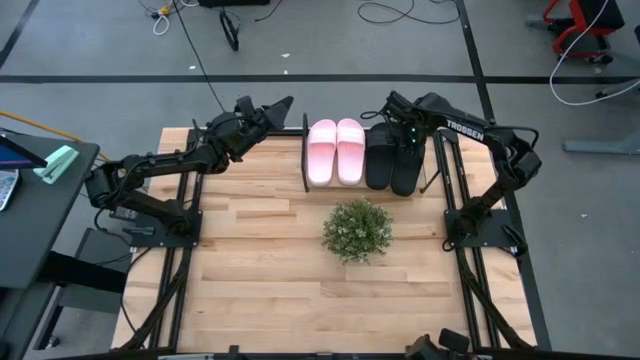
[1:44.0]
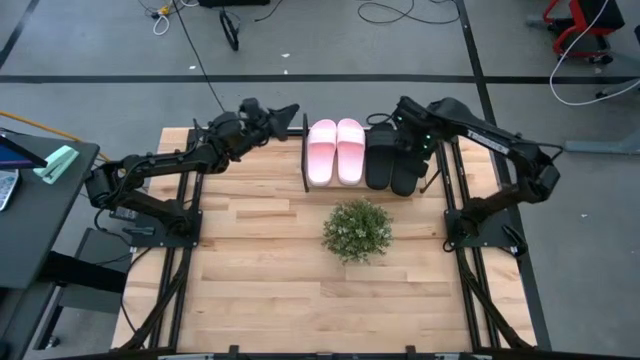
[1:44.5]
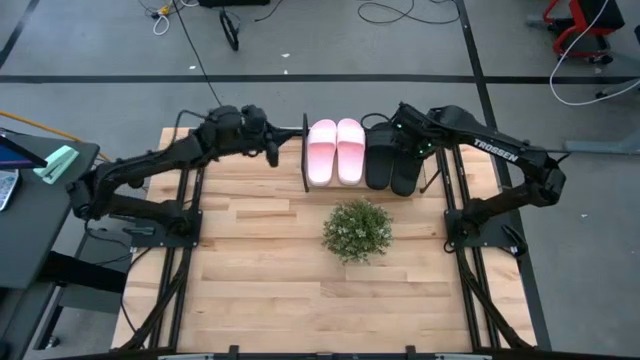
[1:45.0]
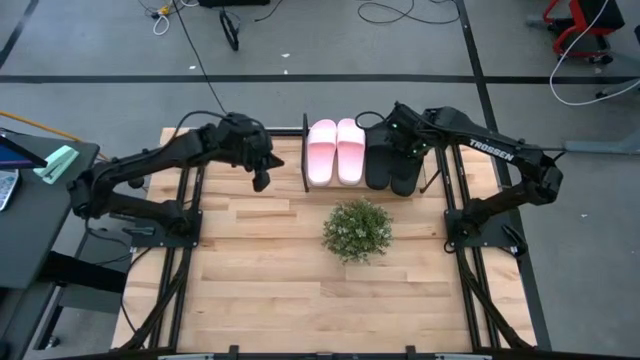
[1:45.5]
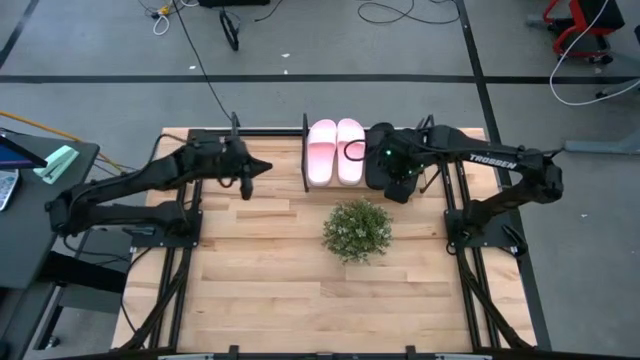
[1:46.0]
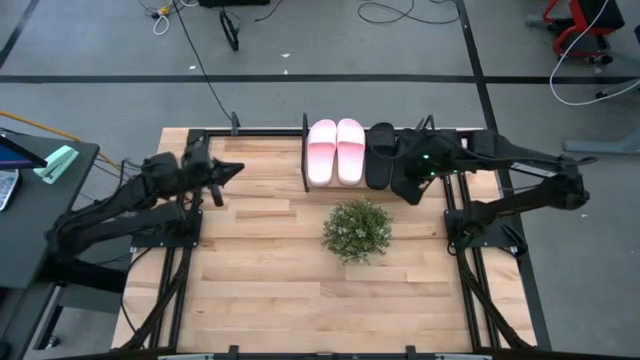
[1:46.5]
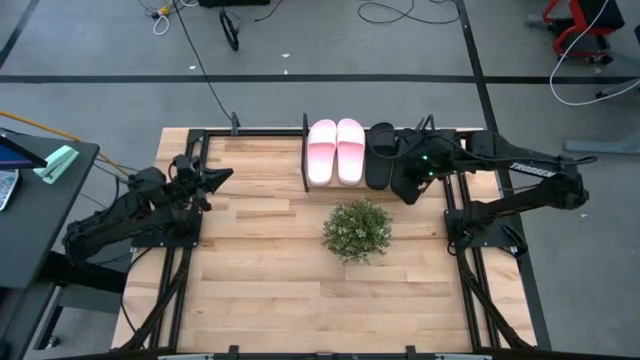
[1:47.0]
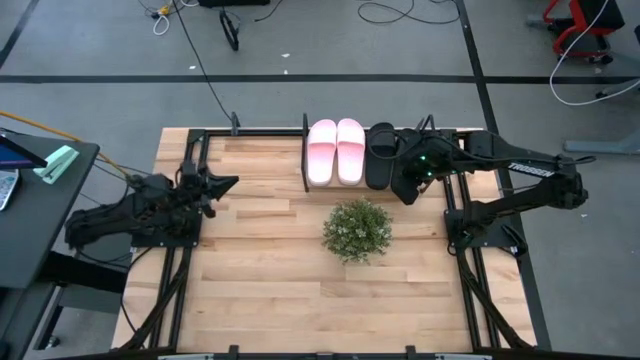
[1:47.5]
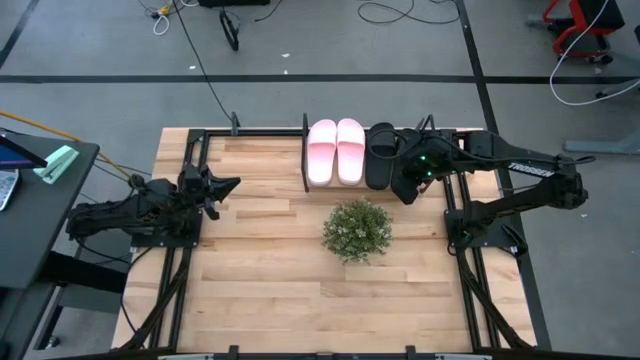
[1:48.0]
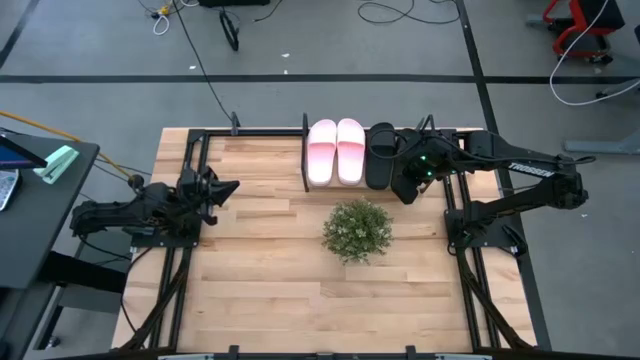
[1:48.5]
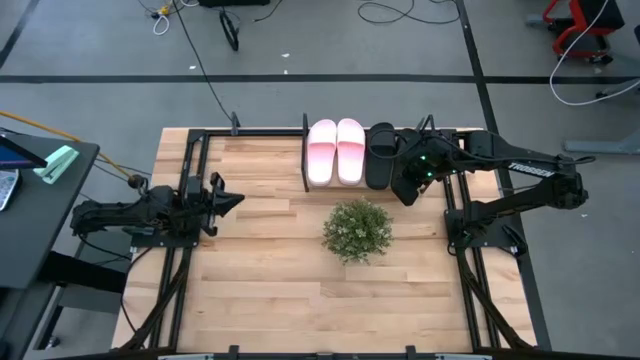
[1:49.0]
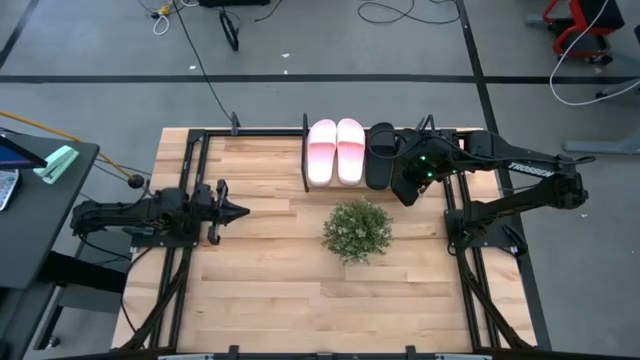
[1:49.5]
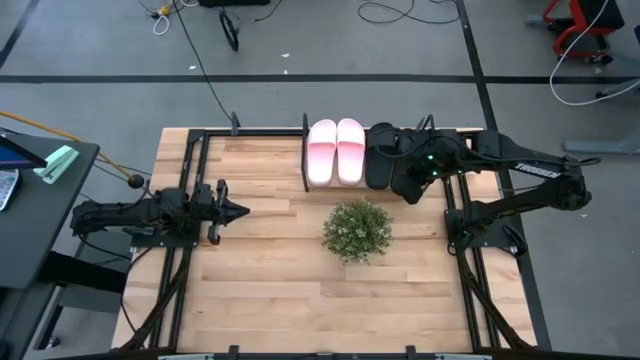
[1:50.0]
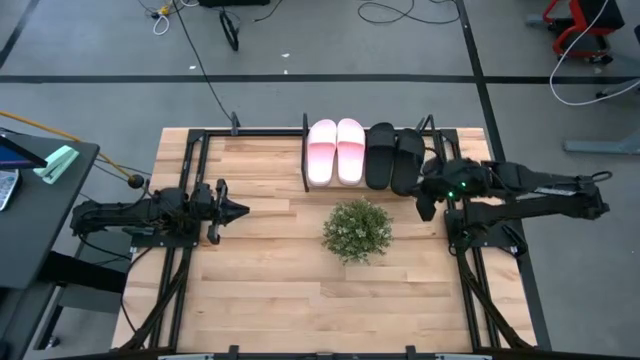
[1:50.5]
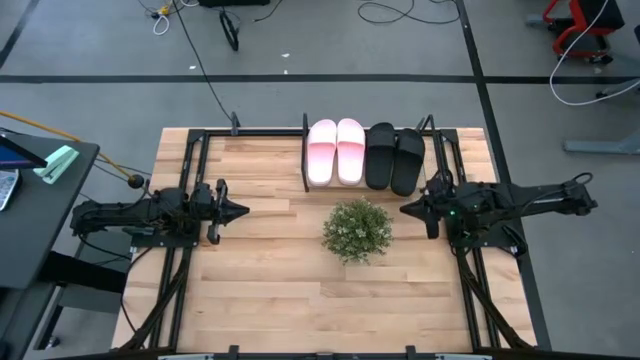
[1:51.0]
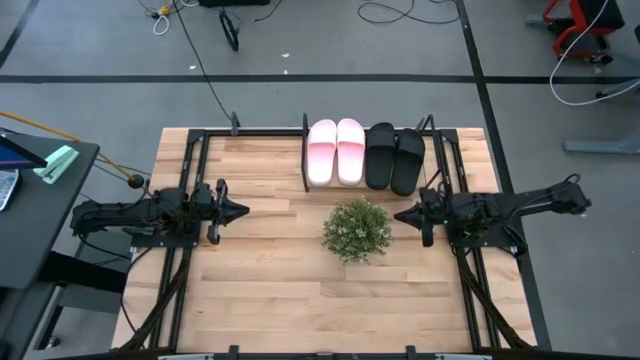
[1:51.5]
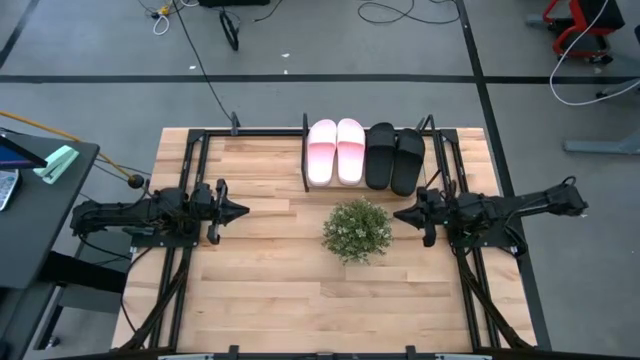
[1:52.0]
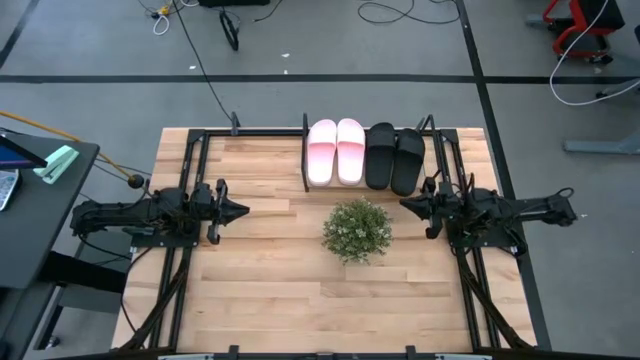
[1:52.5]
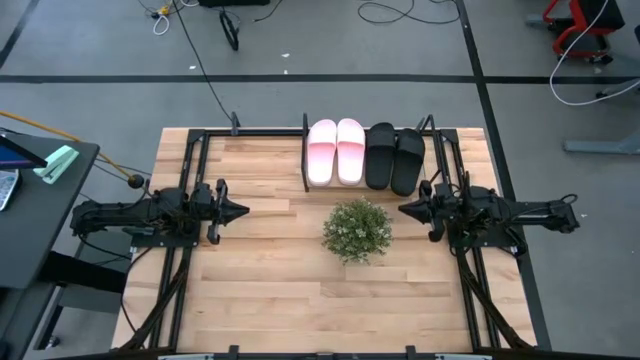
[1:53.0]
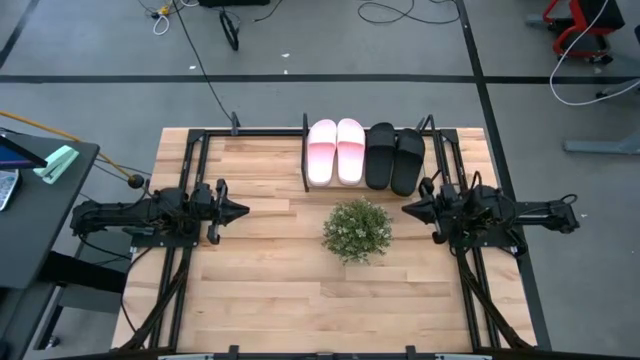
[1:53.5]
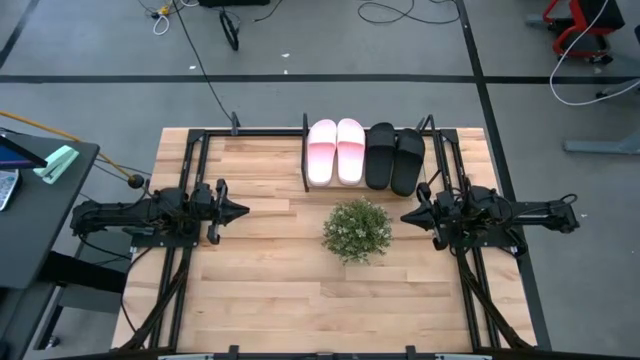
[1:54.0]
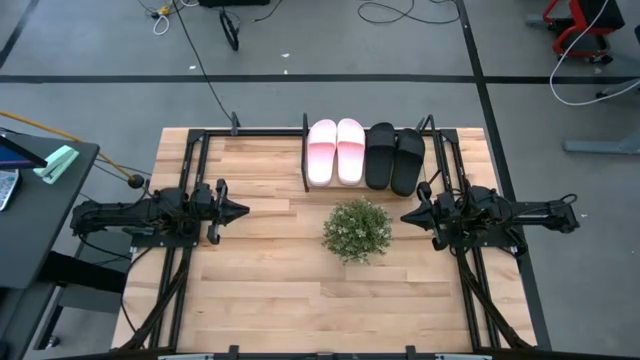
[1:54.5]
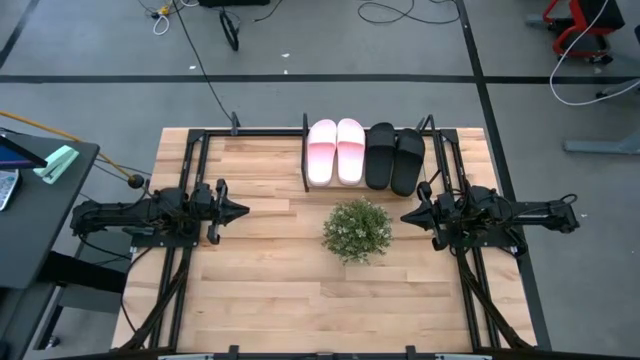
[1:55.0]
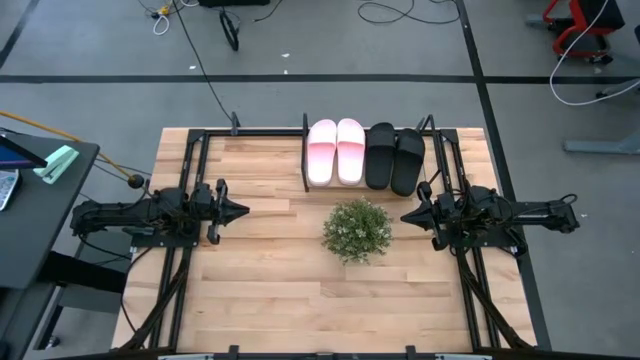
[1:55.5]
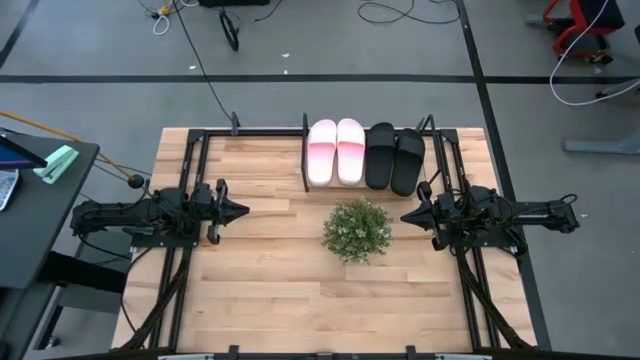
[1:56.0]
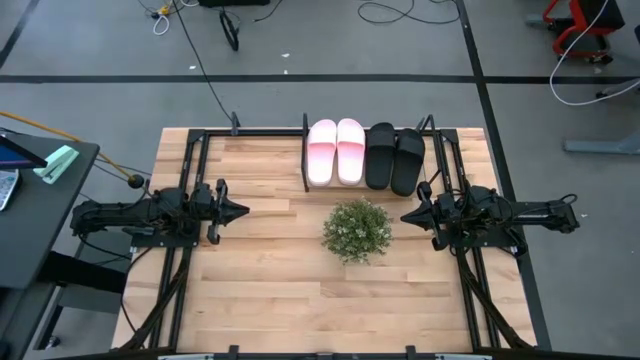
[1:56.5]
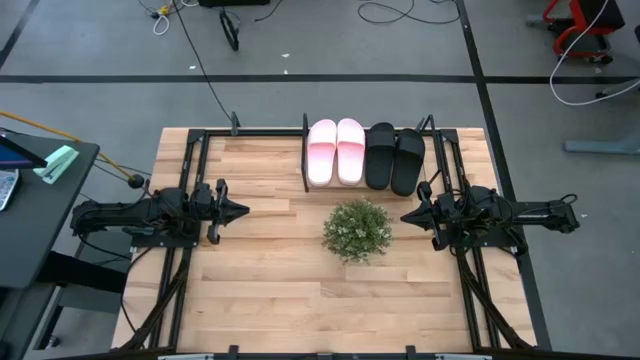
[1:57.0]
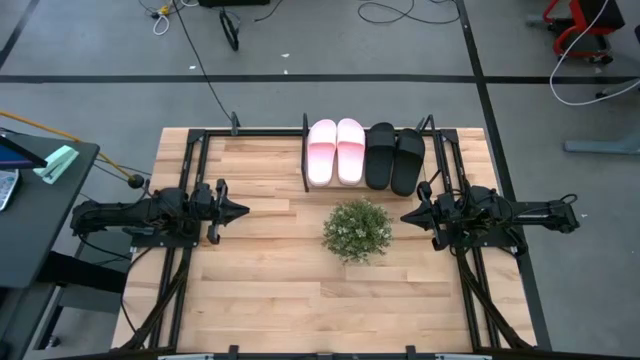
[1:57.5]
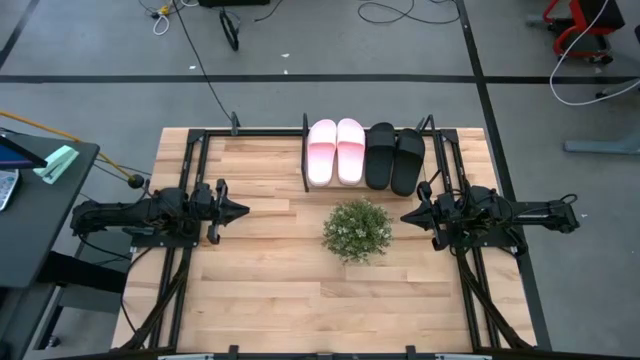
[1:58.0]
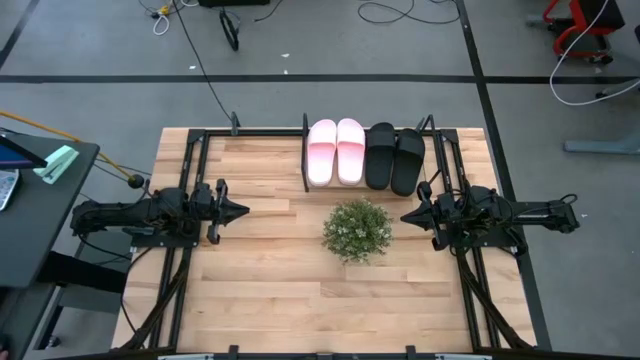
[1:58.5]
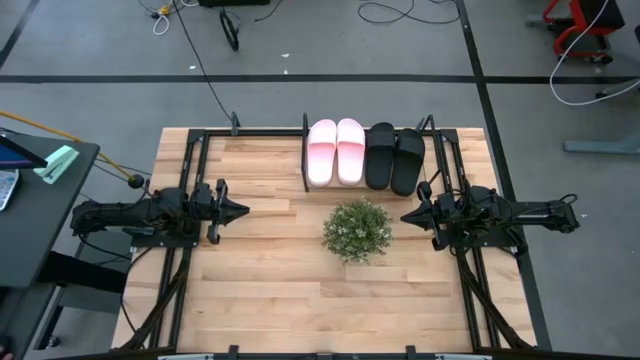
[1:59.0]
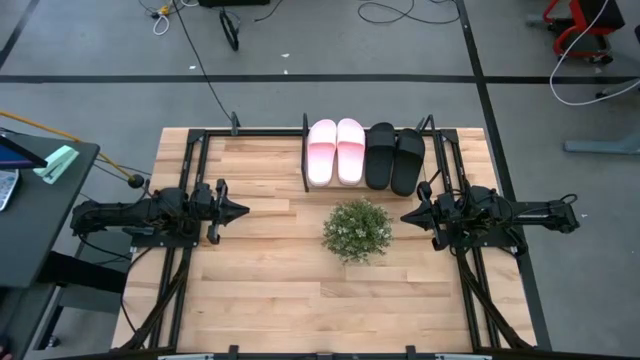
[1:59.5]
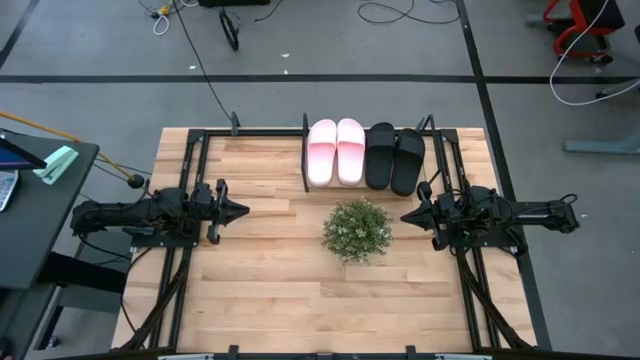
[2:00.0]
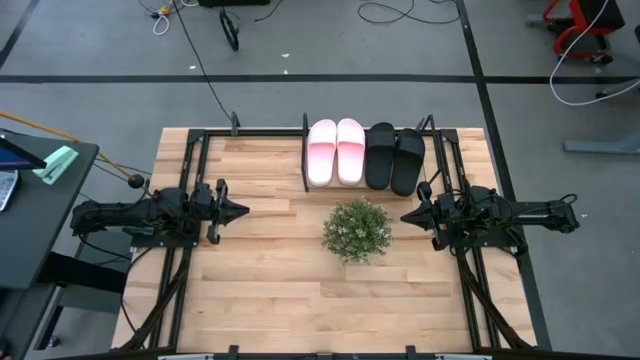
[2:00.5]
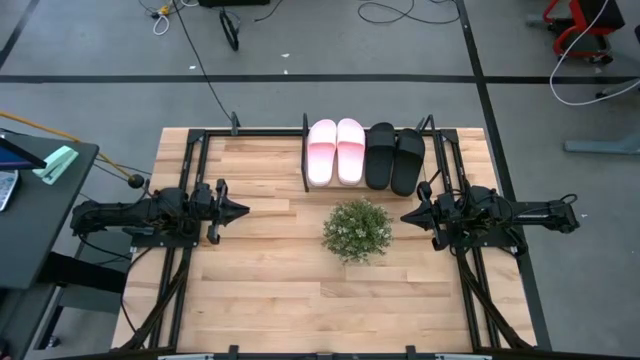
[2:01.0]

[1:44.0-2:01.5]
Task: Pick and place slides into the shelf
Return to Home Position

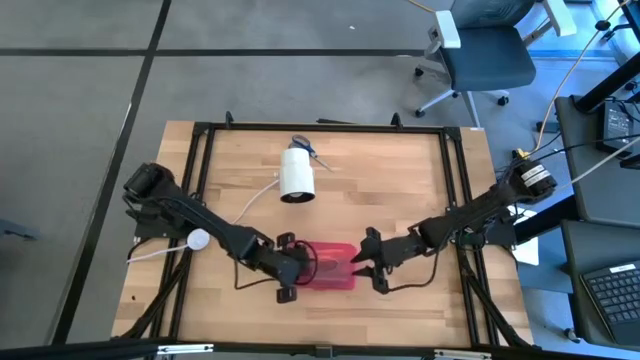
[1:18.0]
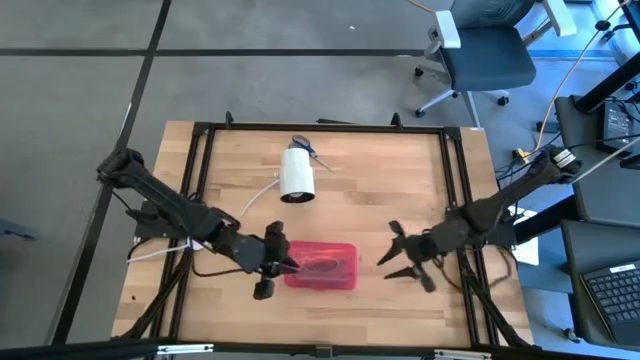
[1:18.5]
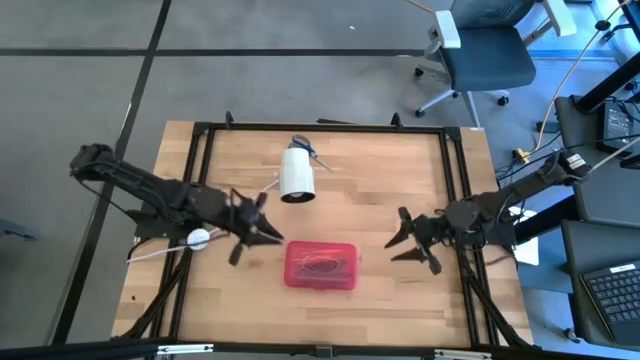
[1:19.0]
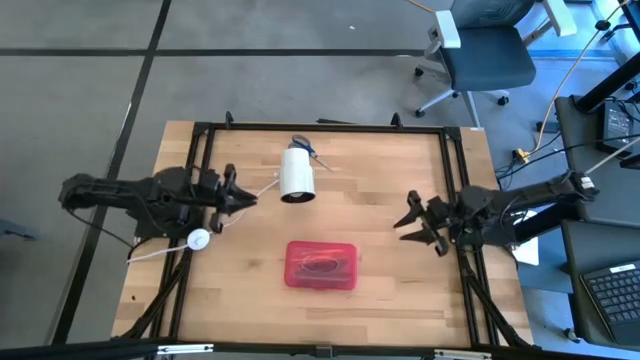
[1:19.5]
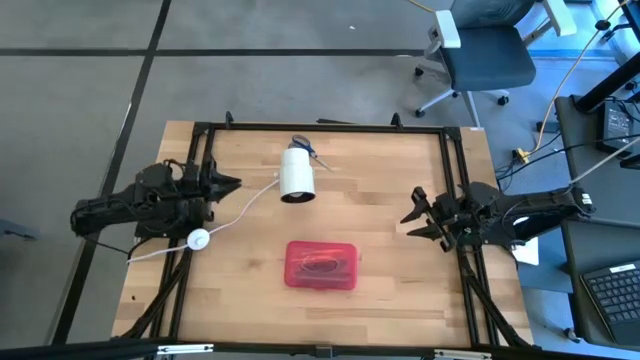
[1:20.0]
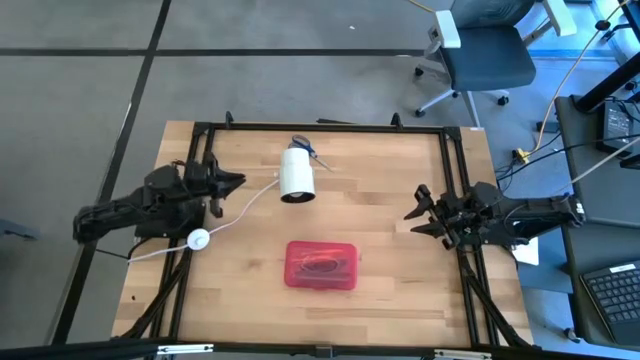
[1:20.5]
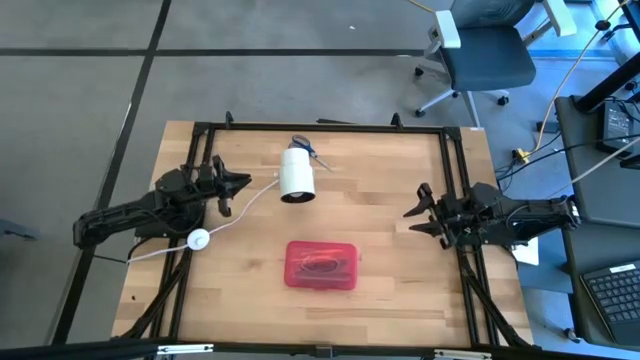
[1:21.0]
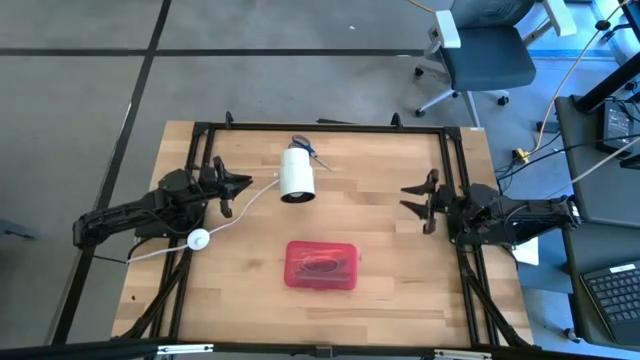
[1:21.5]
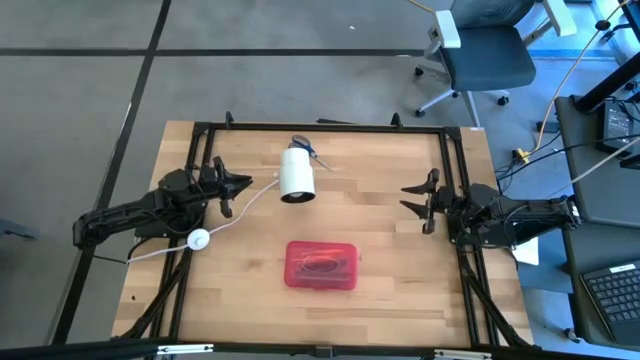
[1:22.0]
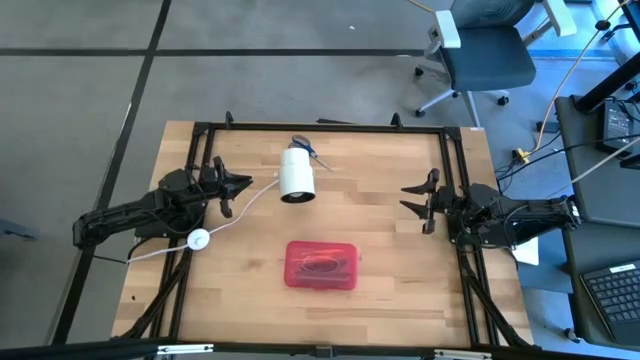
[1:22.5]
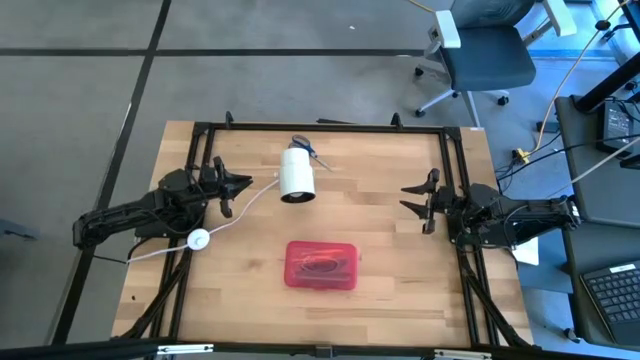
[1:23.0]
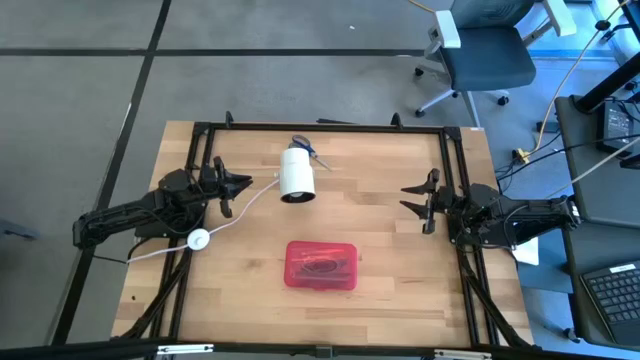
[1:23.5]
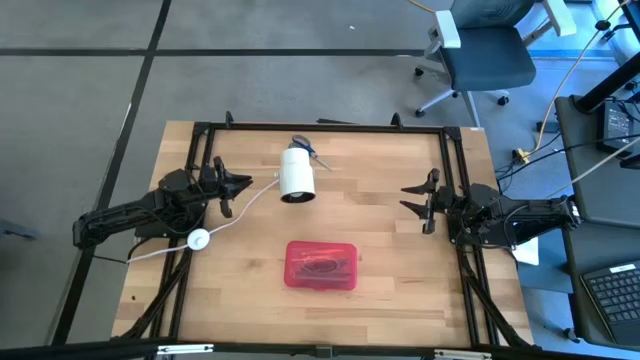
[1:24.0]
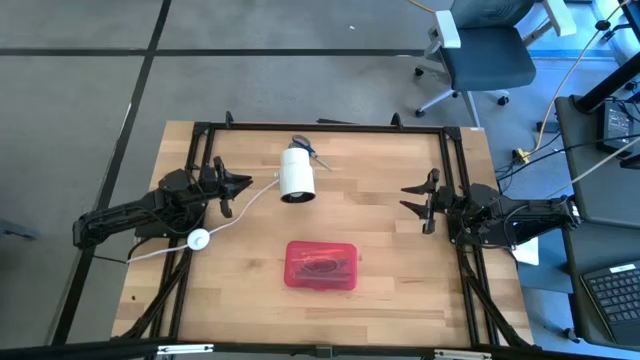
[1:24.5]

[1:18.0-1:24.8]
Task: Pick & place school supplies into a supply box
Return to Home Position
